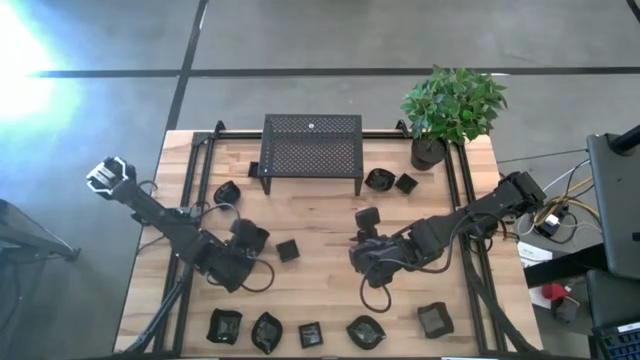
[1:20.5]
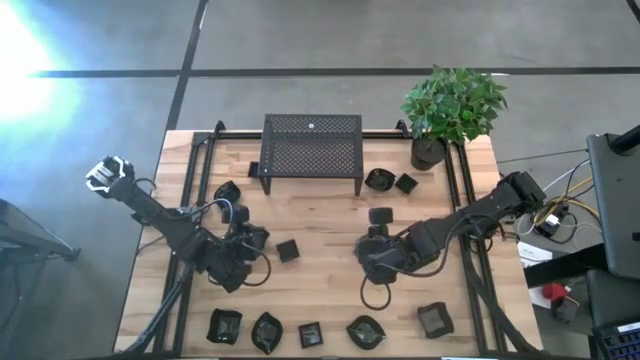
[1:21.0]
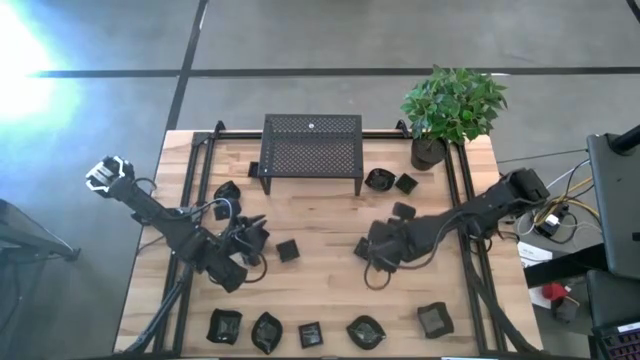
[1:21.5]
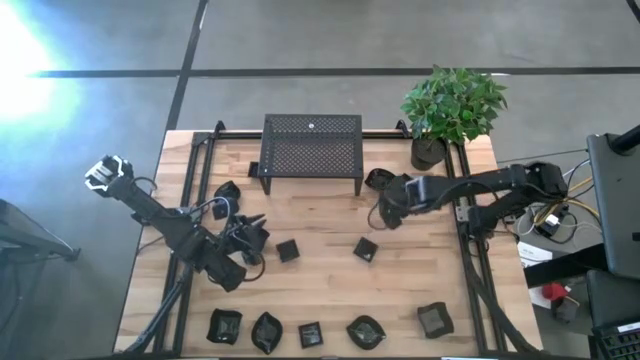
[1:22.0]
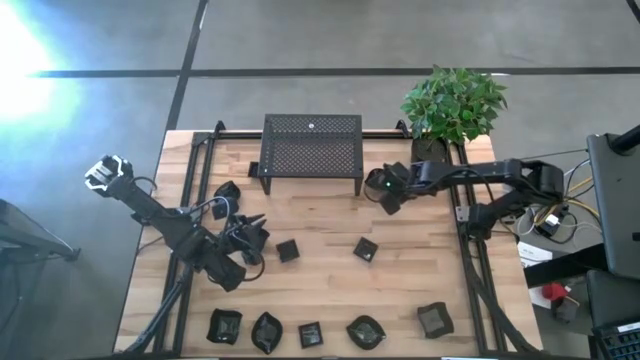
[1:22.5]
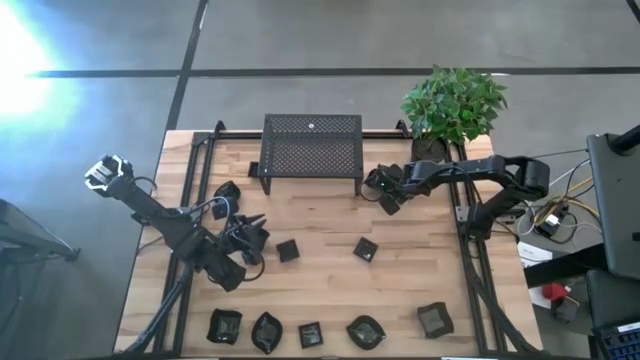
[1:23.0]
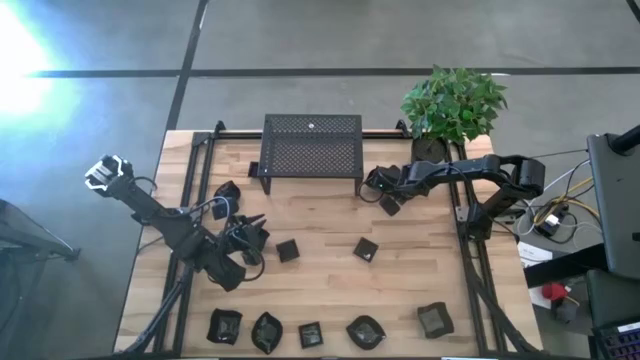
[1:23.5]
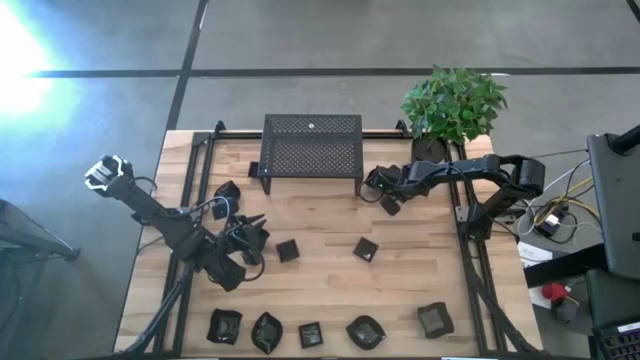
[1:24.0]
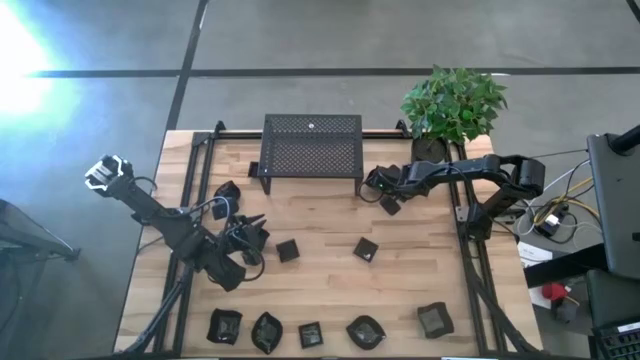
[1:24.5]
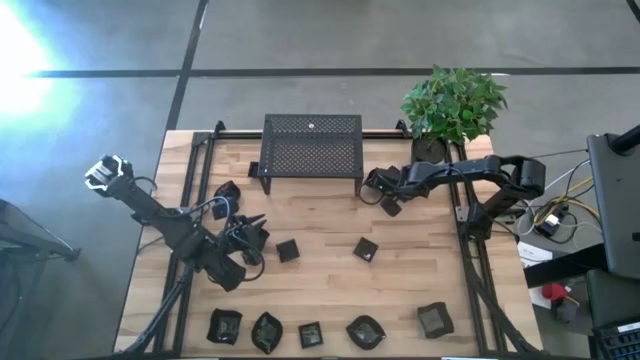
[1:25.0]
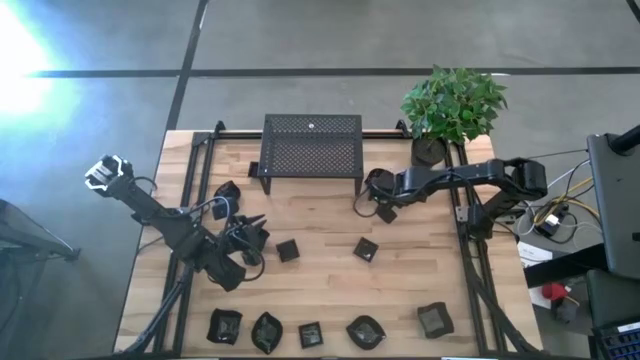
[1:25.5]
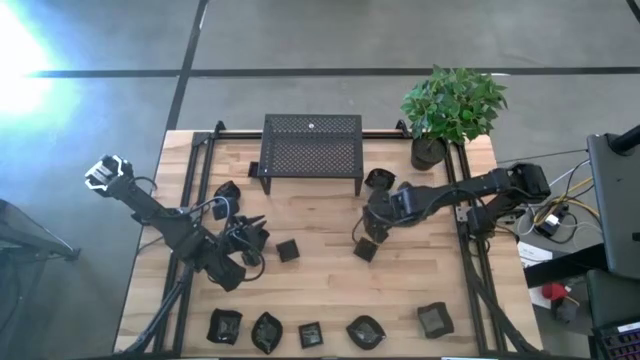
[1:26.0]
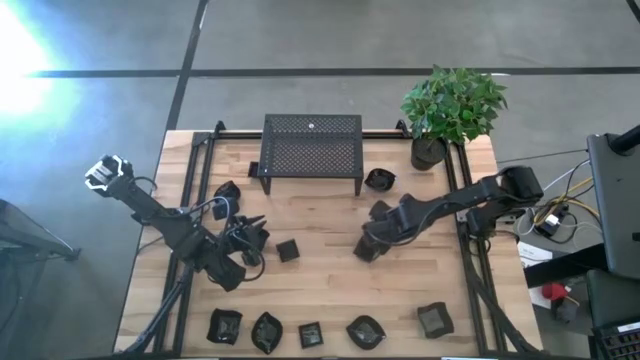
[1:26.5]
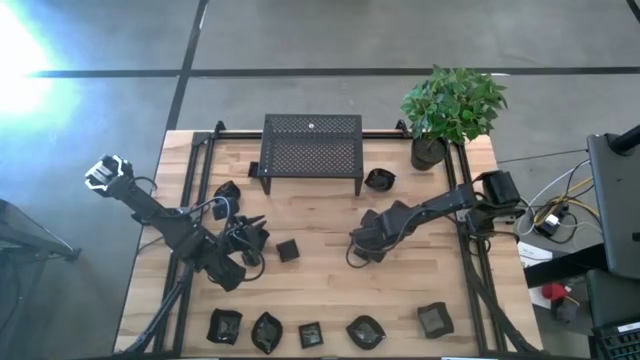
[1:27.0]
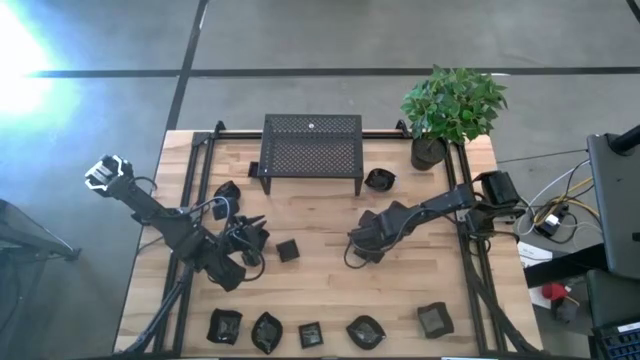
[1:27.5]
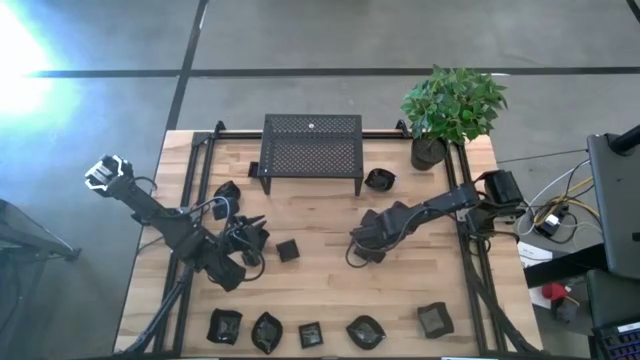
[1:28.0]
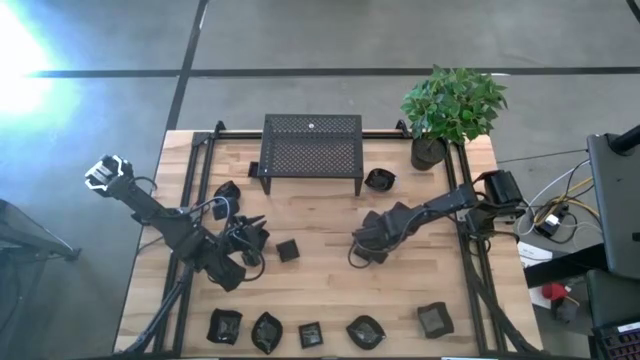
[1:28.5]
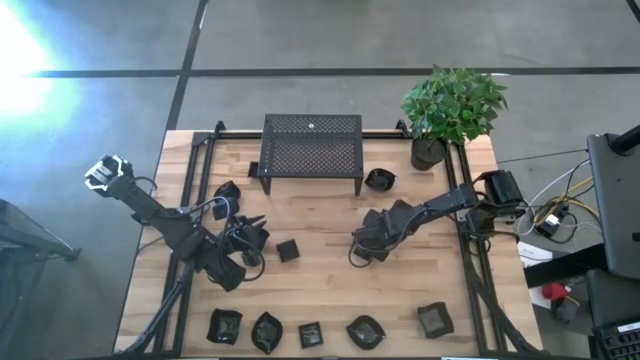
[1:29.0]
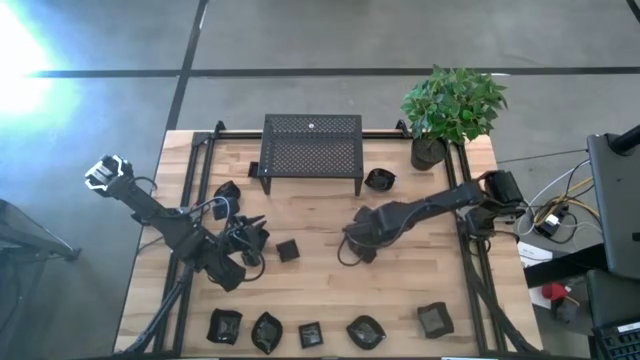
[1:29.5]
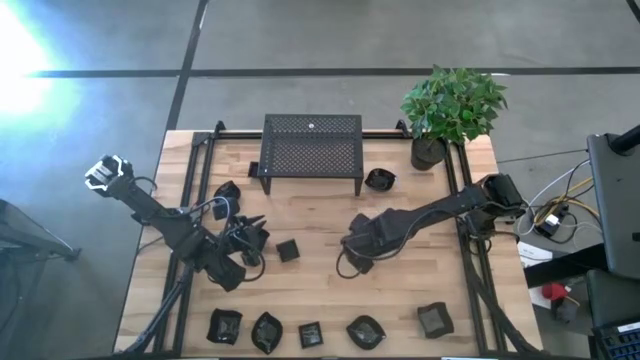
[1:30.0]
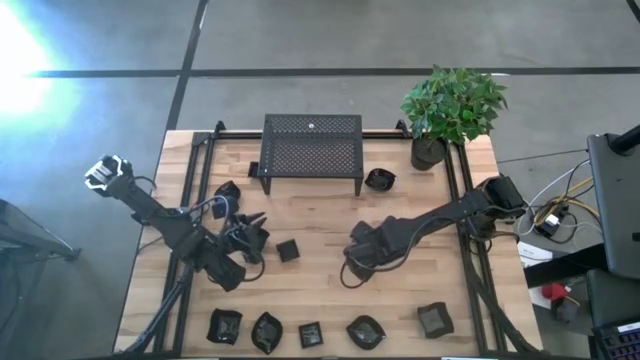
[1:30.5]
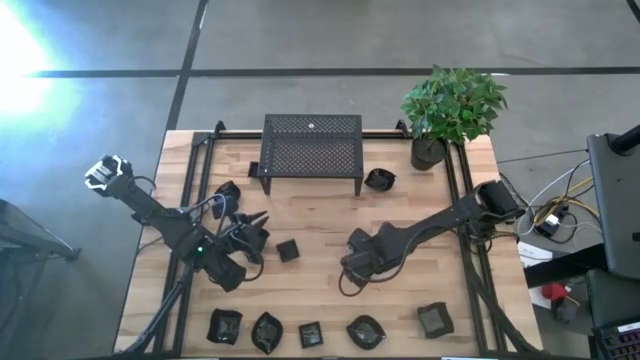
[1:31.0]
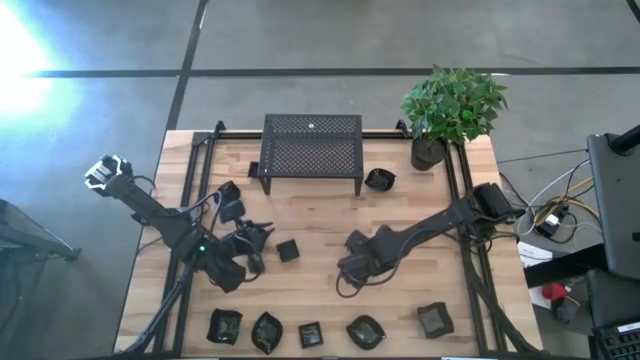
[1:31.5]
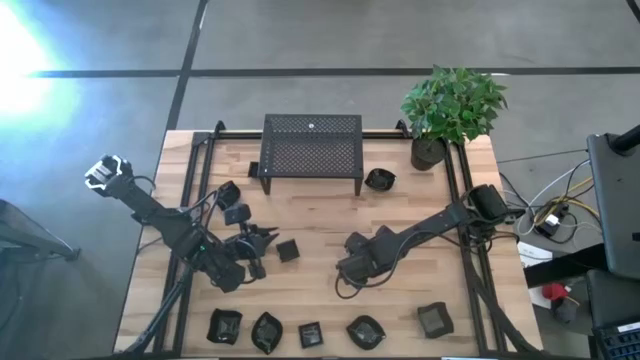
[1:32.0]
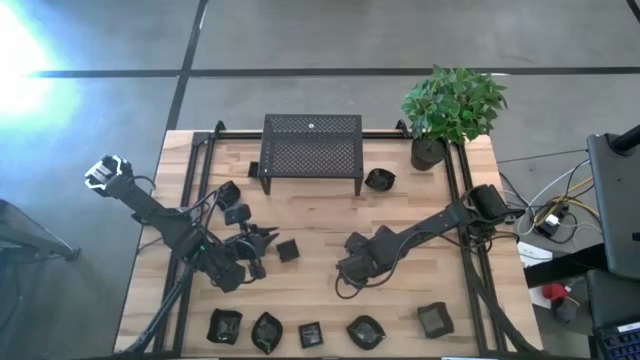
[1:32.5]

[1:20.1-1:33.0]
Task: Pick & Place Mini shaped plates
Stack the black square plate on top of the other black square plate

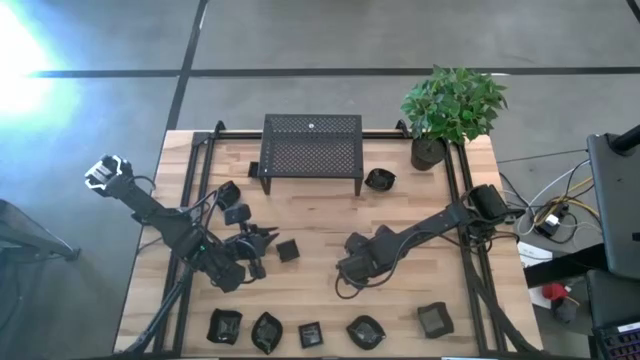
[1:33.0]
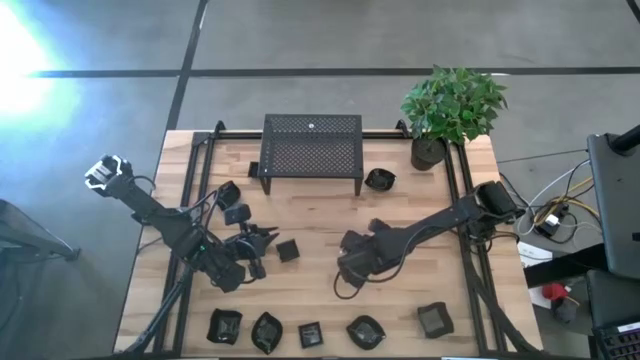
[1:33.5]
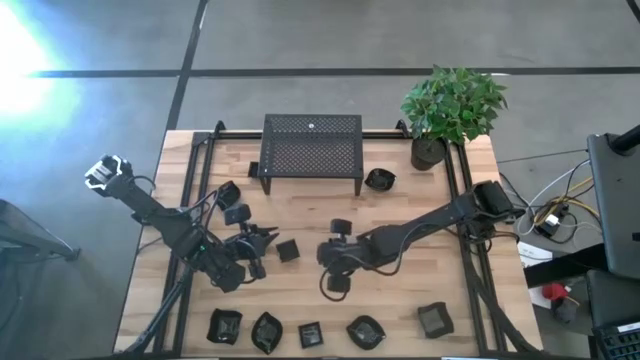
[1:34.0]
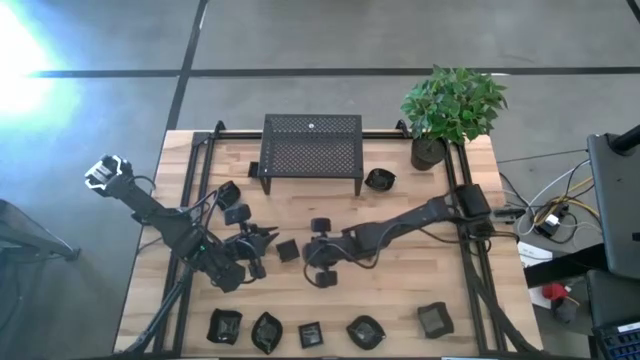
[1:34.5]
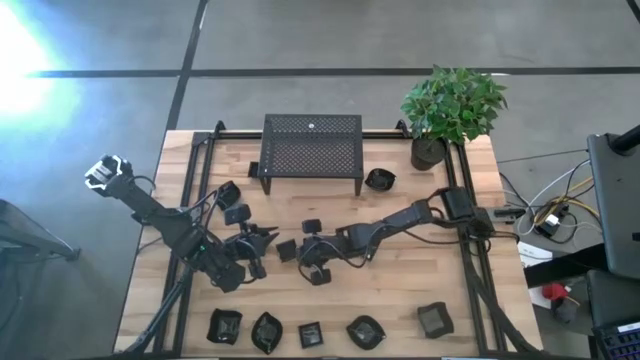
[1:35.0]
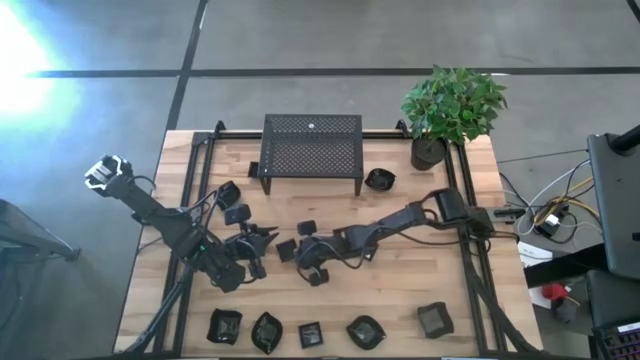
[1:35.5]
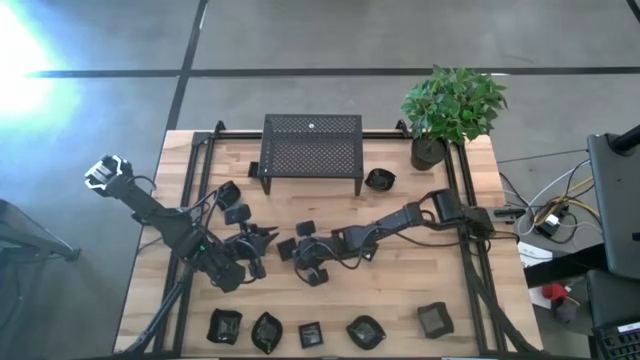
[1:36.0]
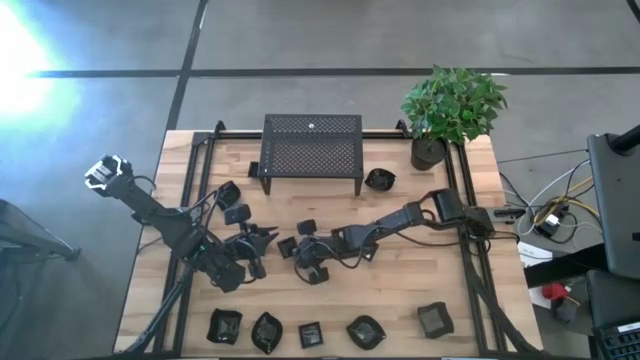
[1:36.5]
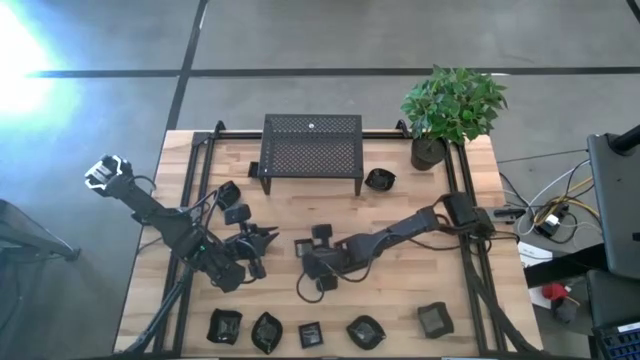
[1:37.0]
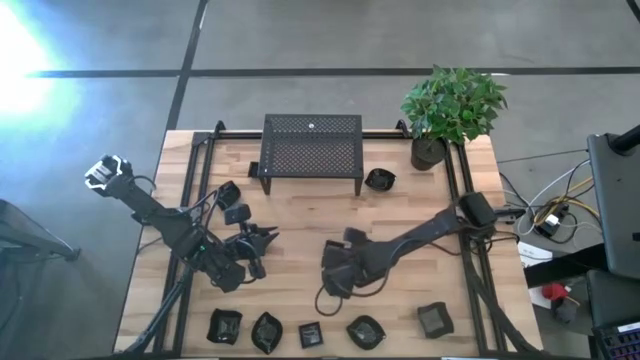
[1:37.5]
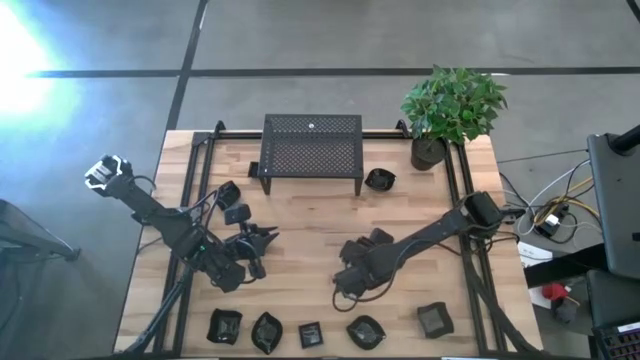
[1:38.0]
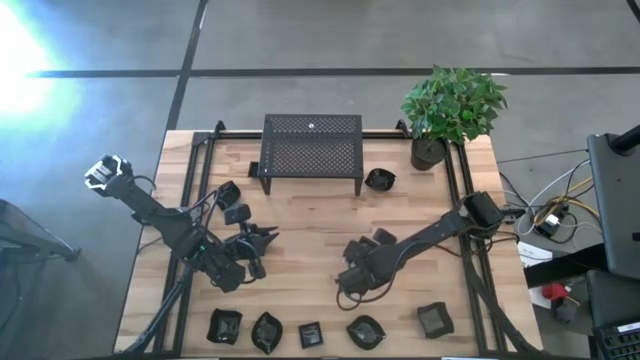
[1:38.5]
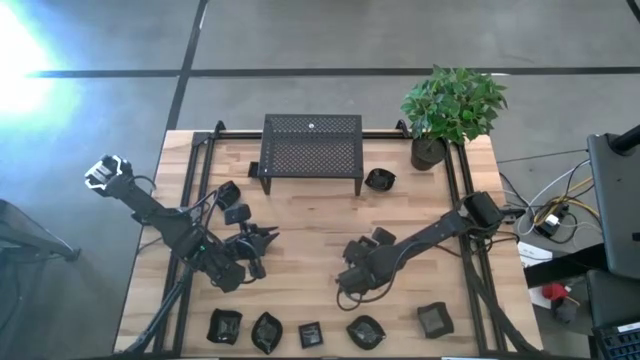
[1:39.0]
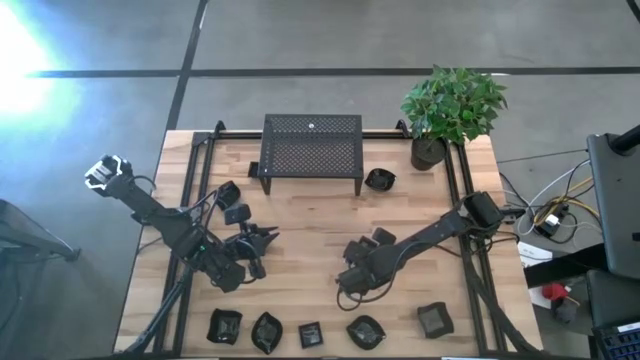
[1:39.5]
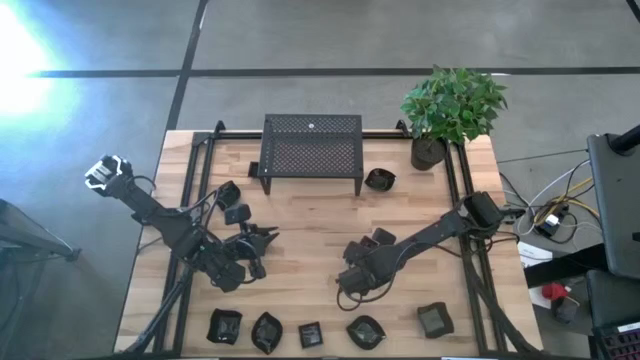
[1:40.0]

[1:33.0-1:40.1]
Stack the black square plate on top of the other black square plate

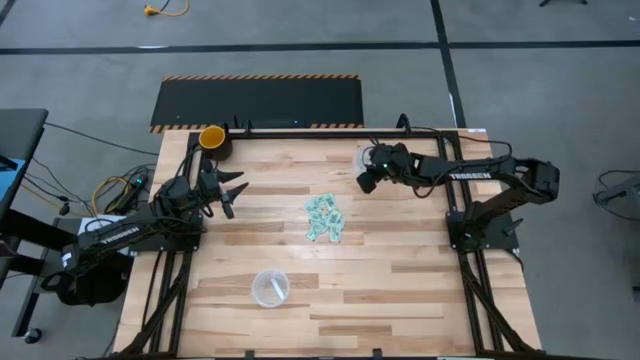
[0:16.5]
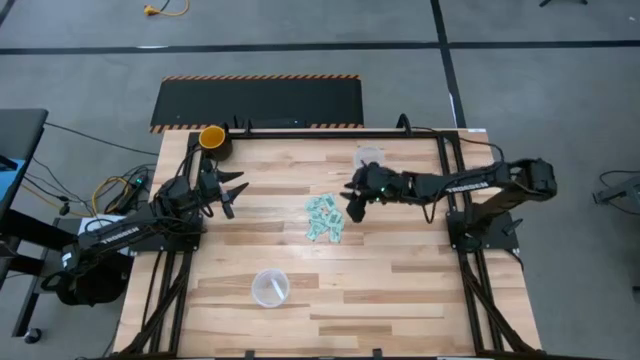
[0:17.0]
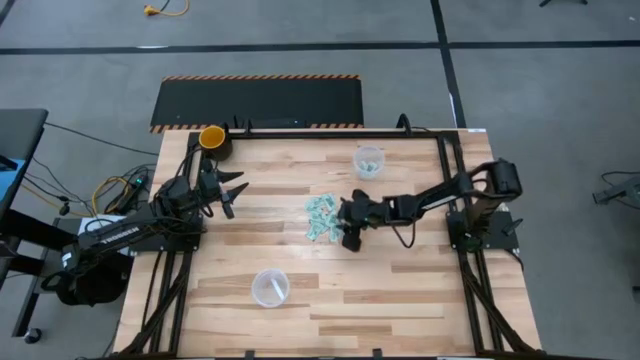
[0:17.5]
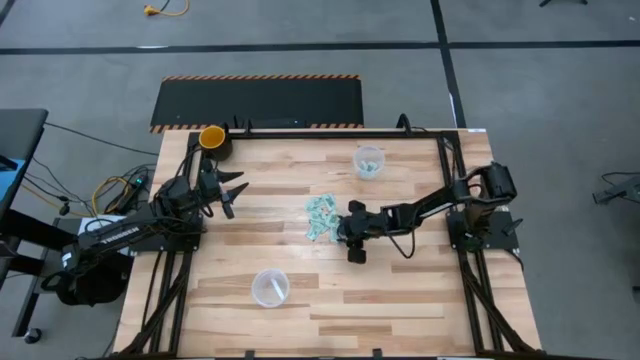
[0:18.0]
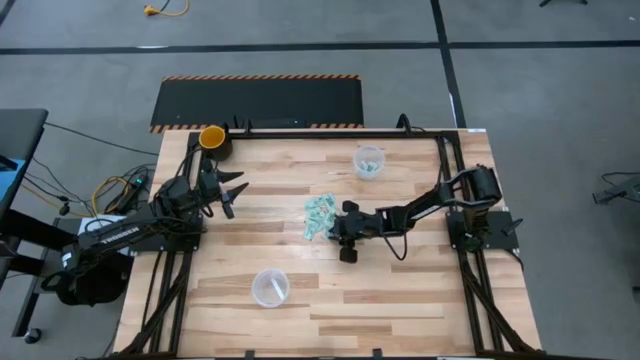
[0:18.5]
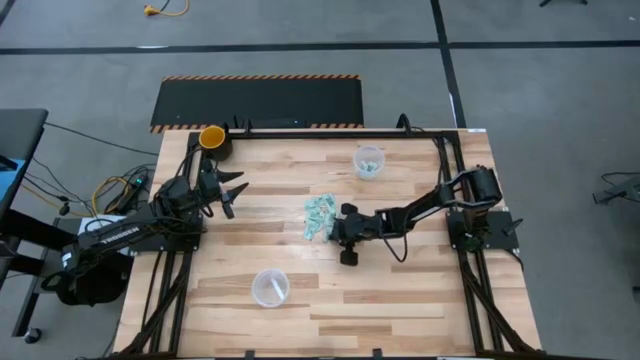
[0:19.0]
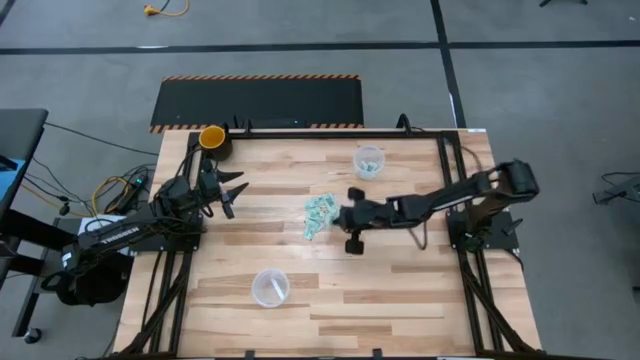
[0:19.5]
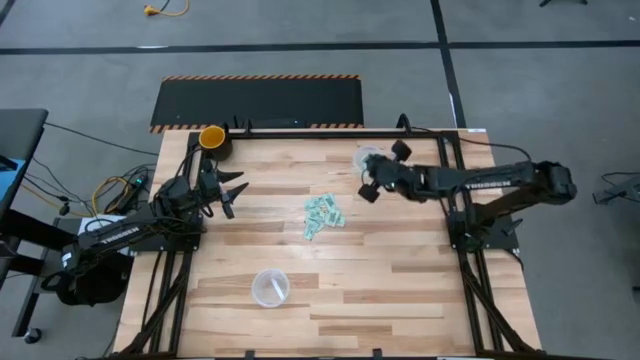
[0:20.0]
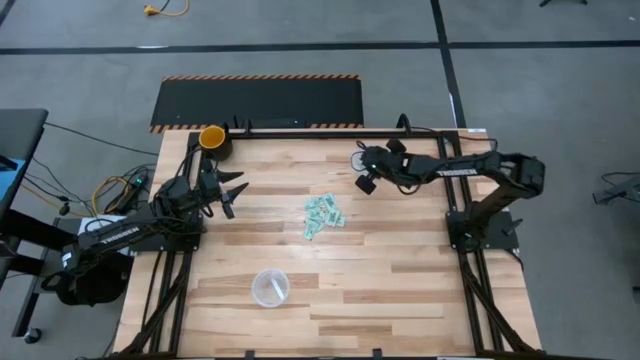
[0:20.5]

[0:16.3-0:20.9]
Task: Pick and place Stevia / Truvia into bins
Put the stevia packet into the top container
